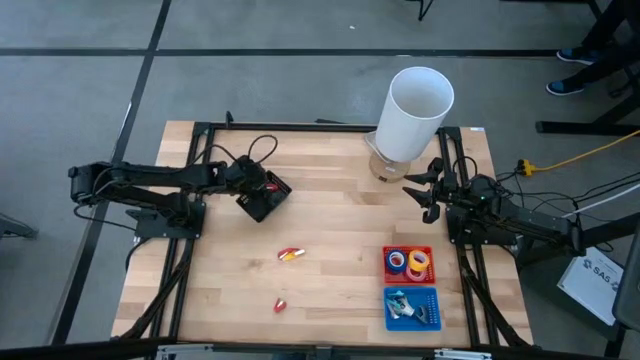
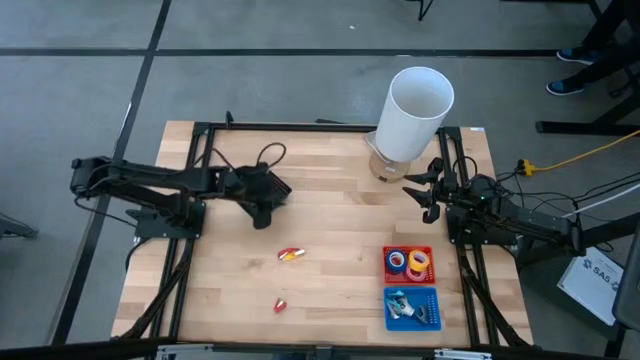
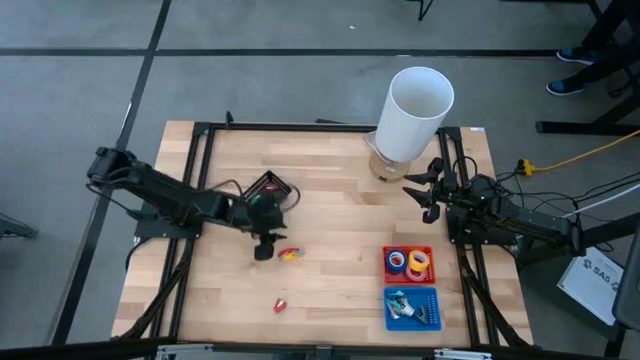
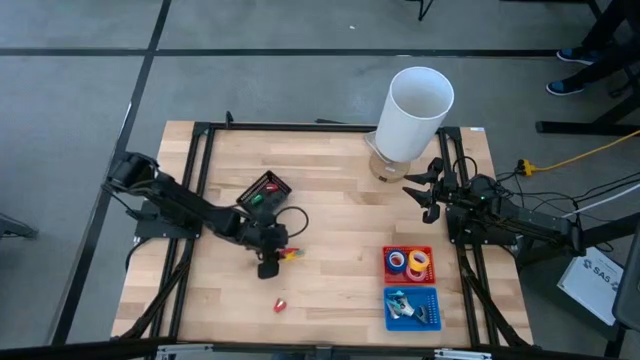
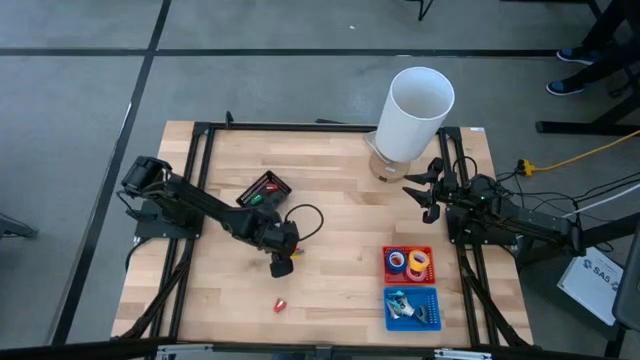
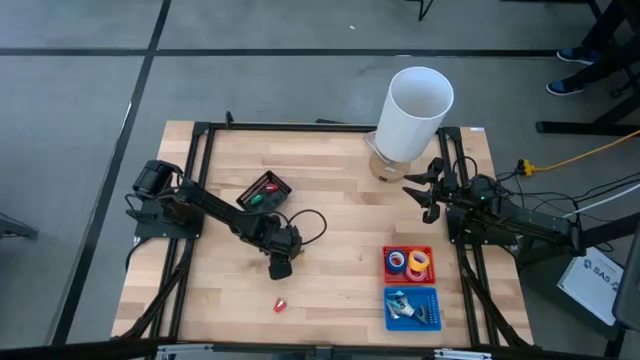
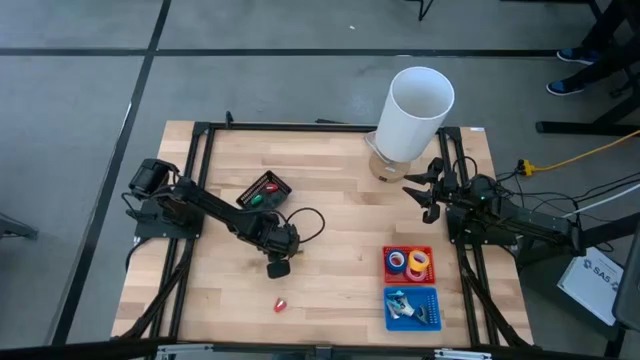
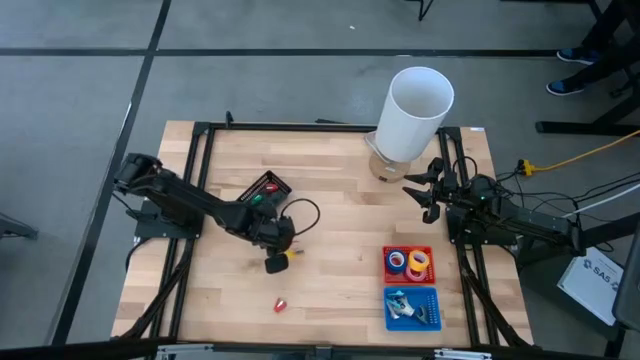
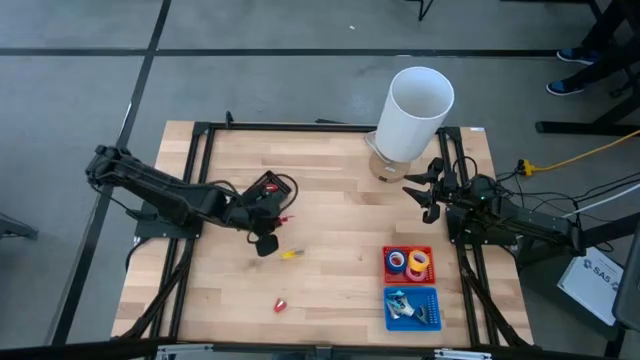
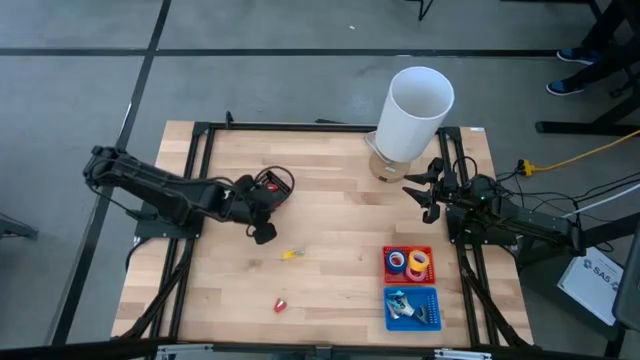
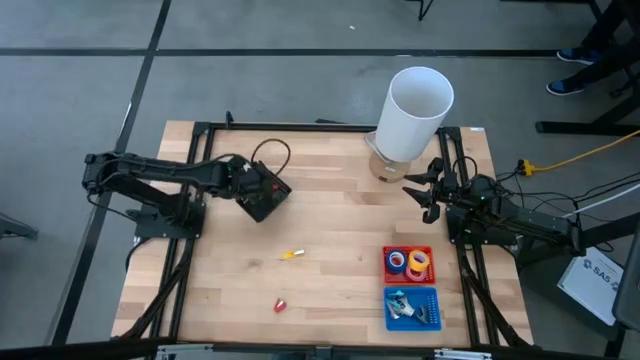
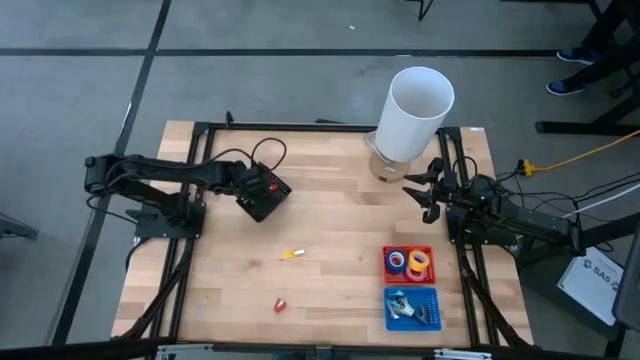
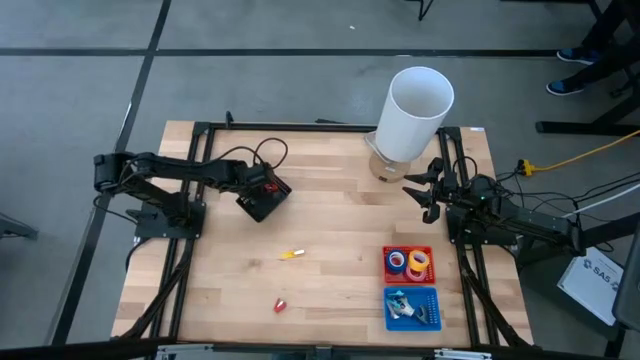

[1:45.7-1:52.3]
Task: Pick and place Stapler, Stapler remover, tape
Put the red stapler into the black basket

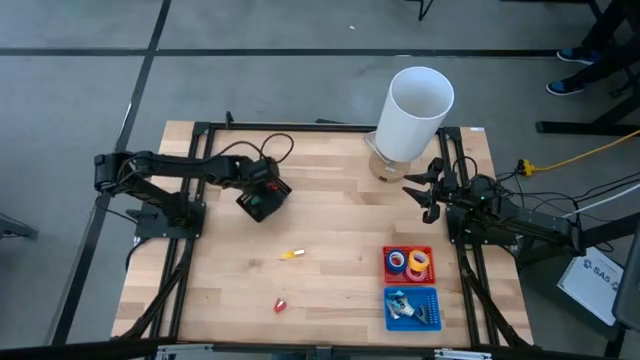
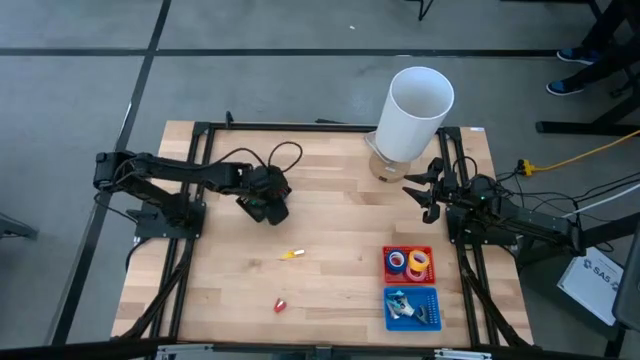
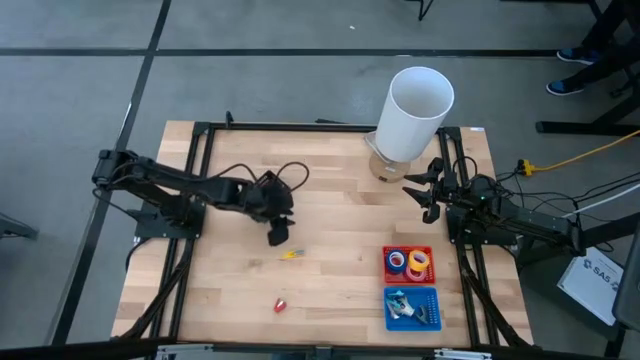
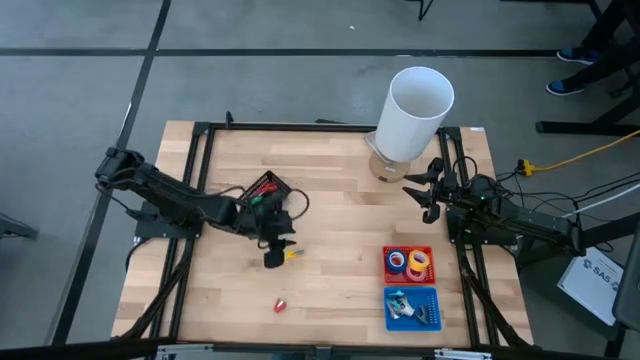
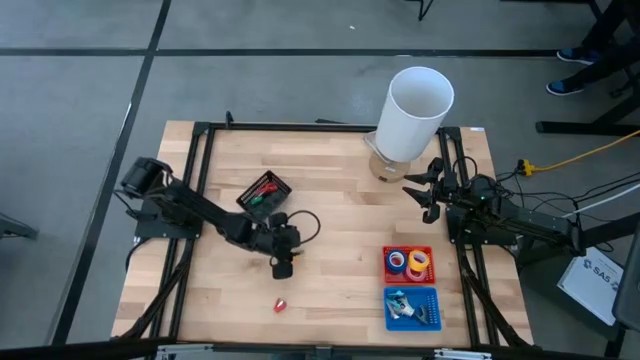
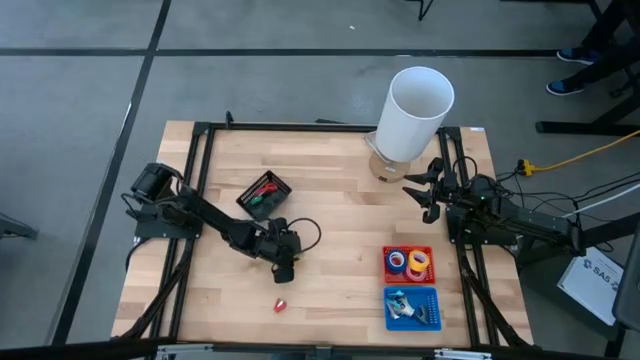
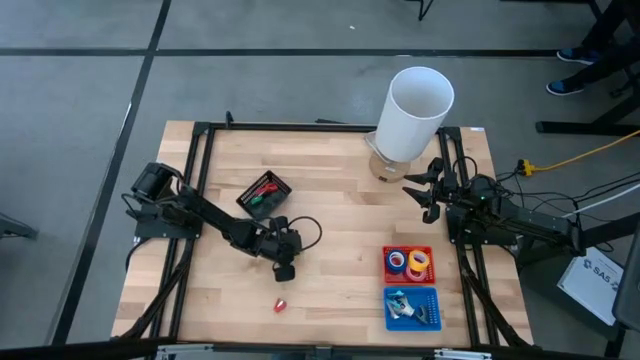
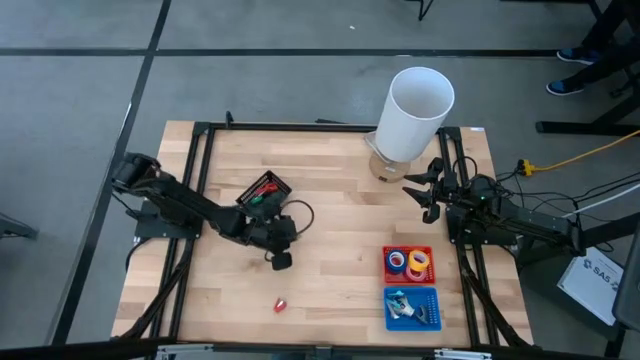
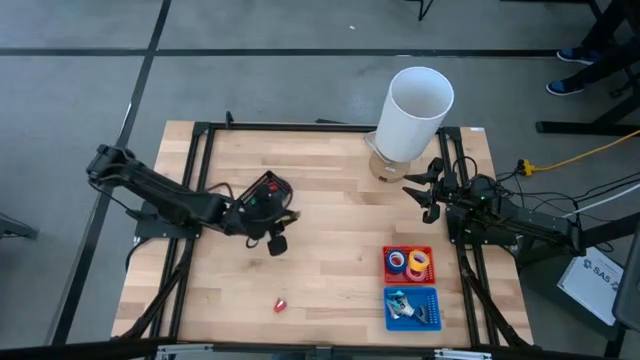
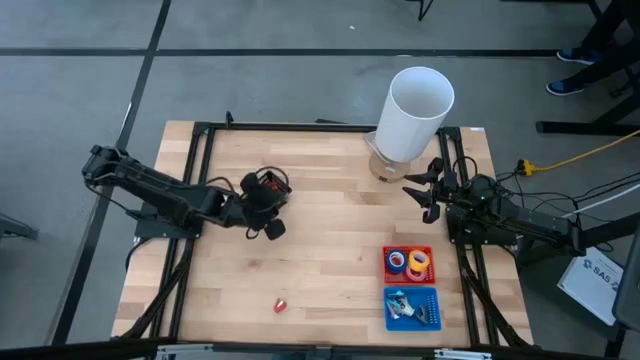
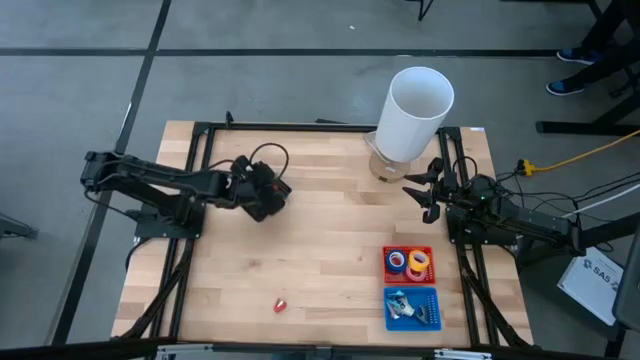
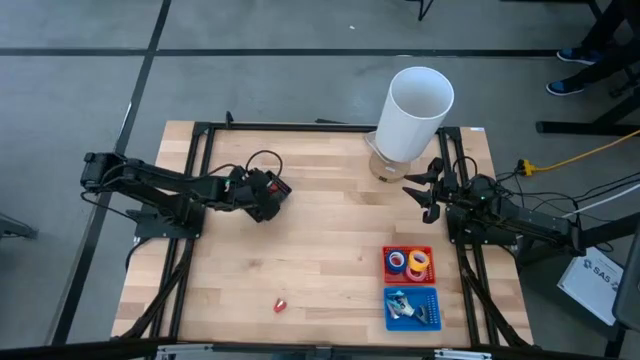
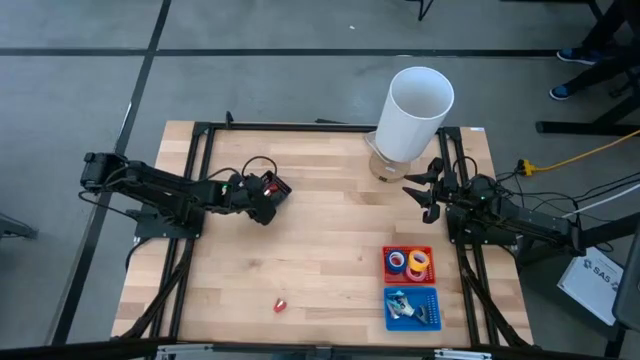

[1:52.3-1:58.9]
Put the yellow stapler into the black basket

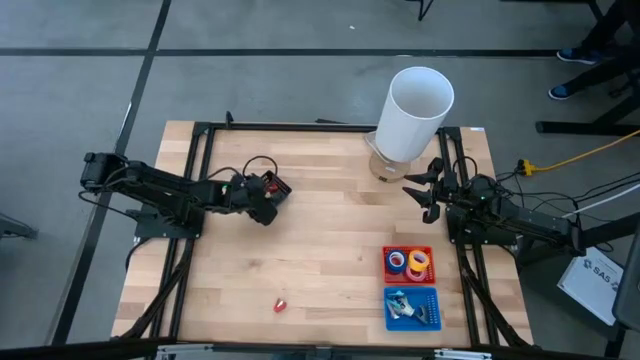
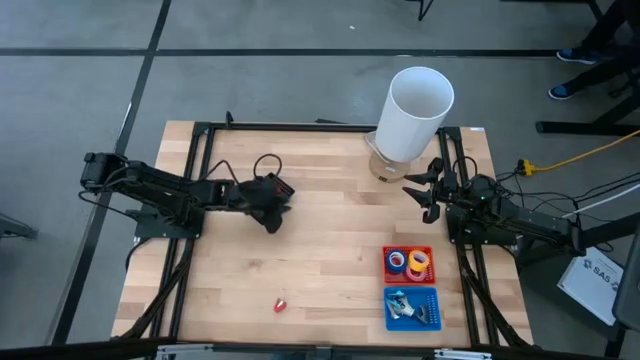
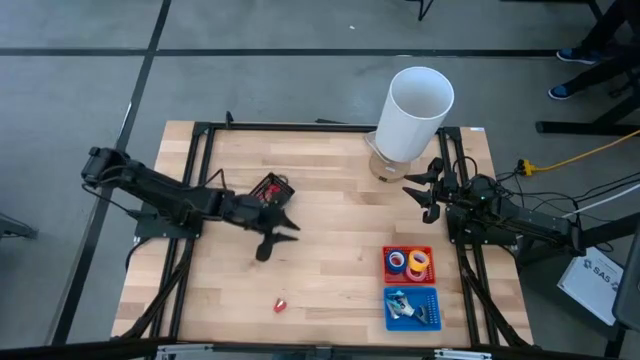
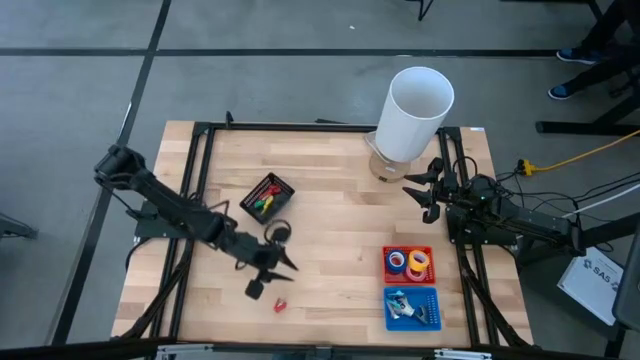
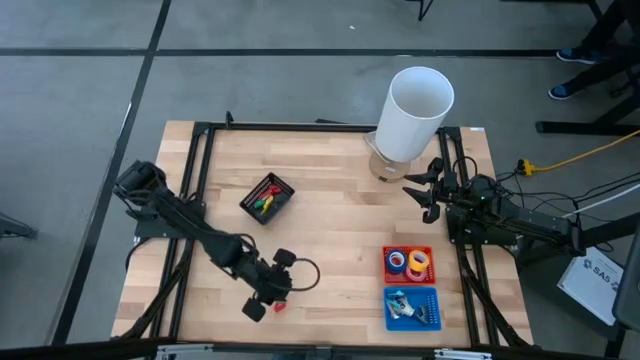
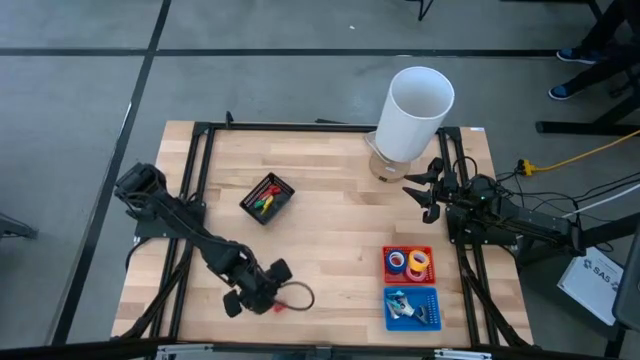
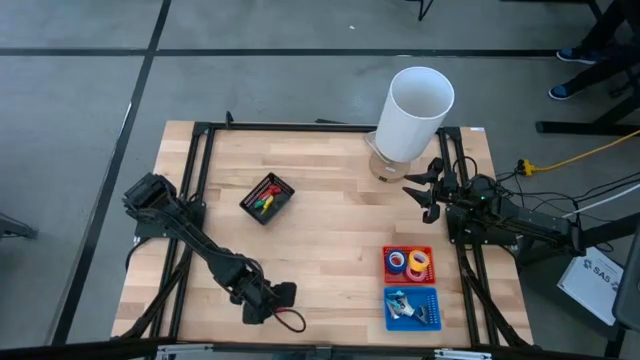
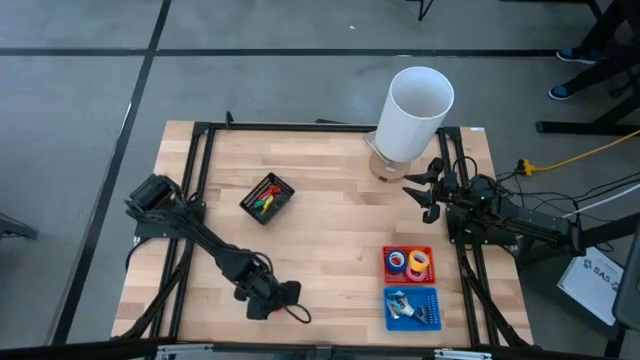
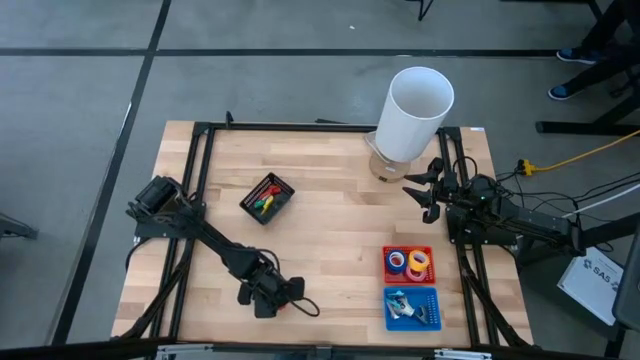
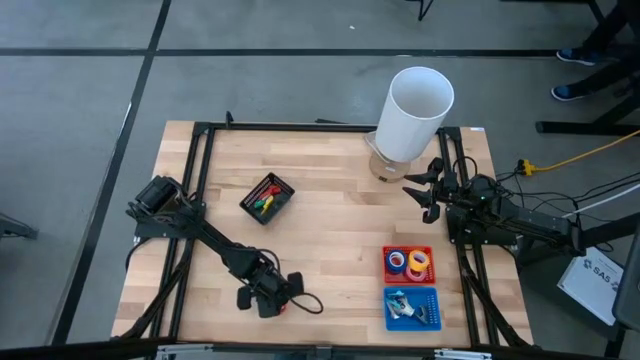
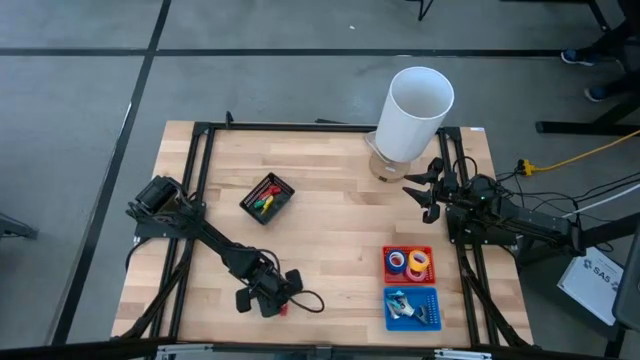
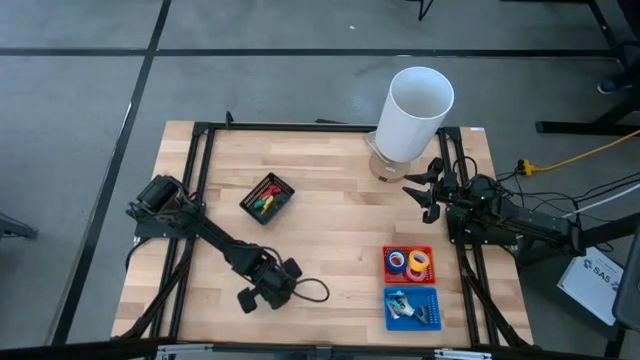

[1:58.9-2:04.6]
Put the red stapler into the black basket

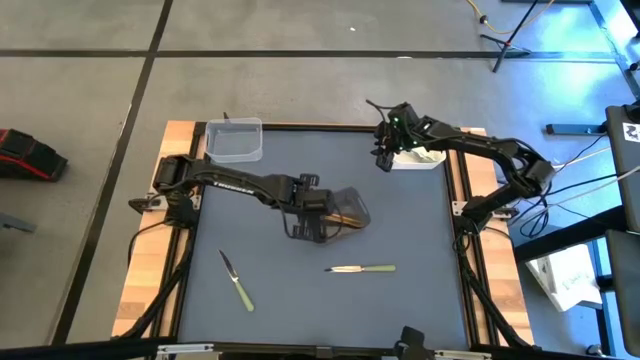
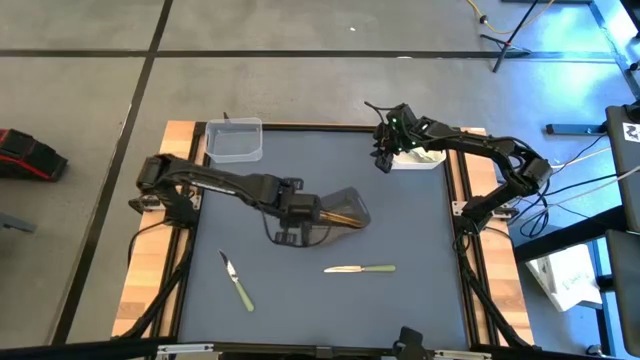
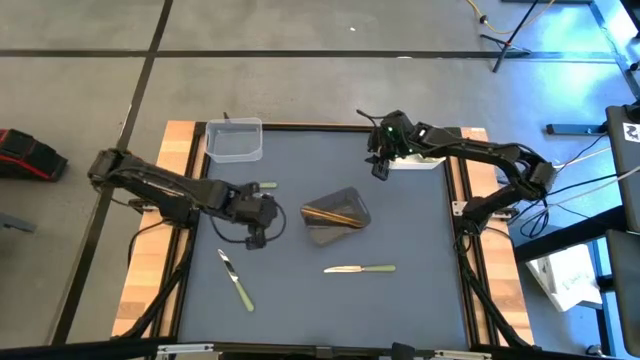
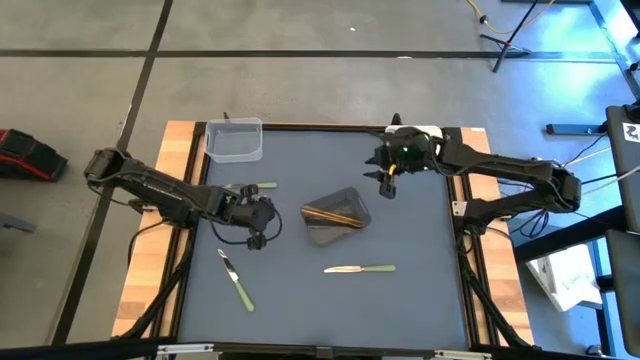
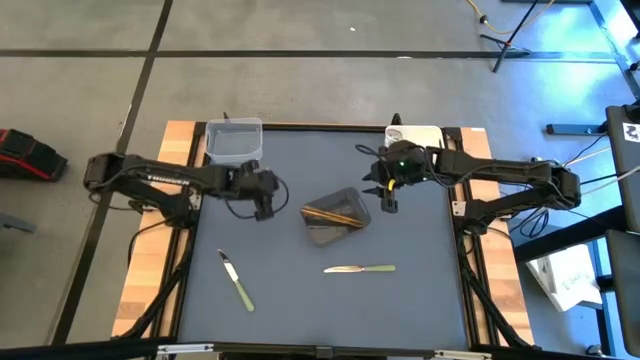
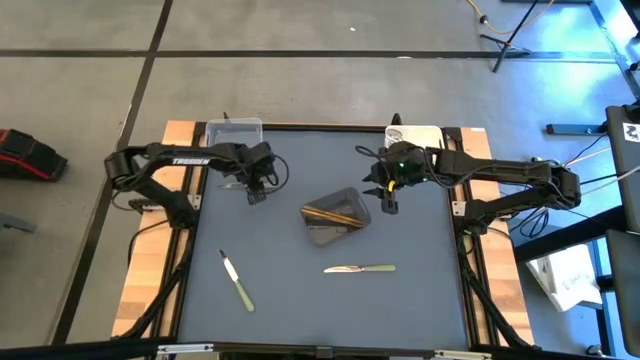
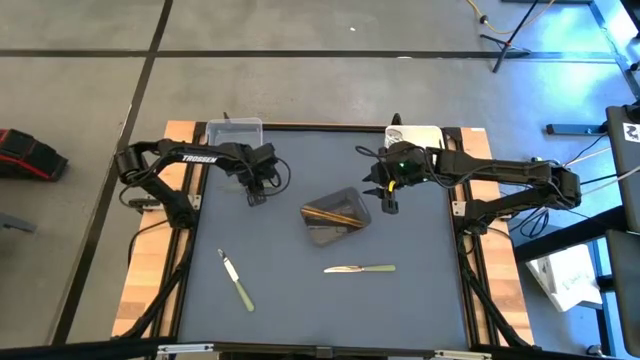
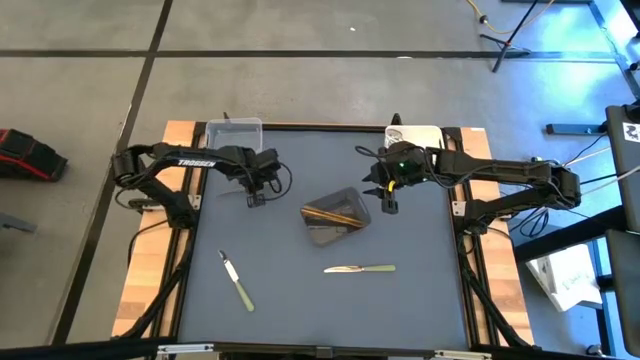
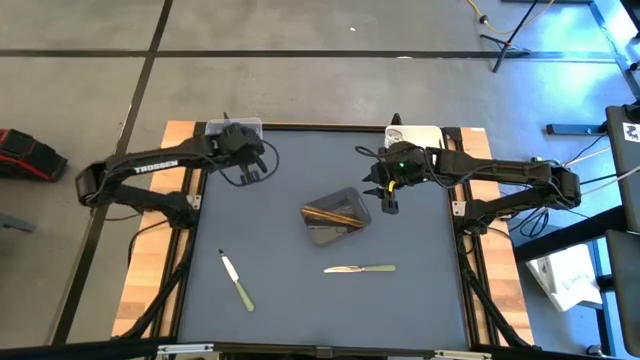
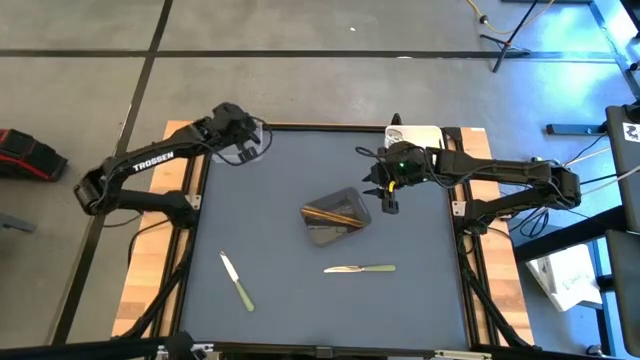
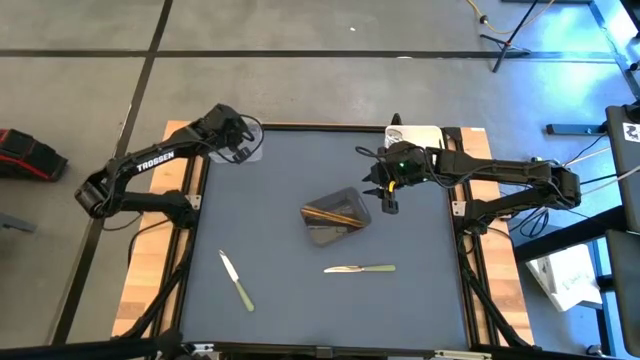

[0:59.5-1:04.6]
Task: Sort silverware by color (type)
Put the green table knife into the transparent bin
